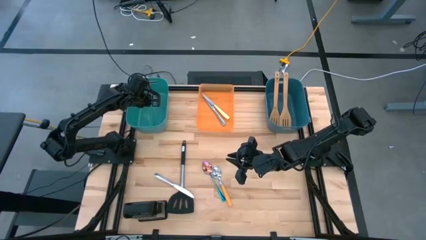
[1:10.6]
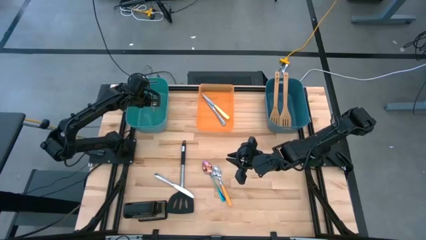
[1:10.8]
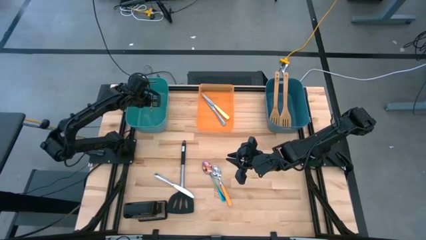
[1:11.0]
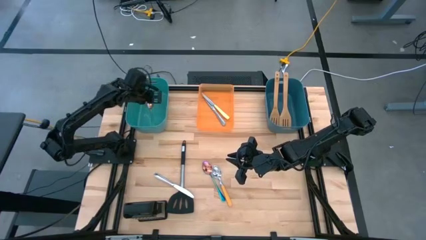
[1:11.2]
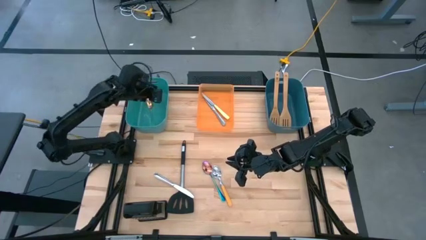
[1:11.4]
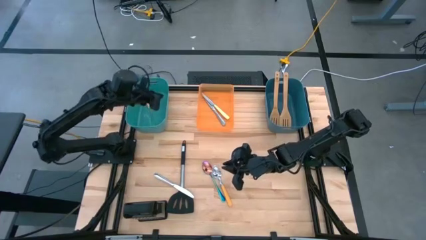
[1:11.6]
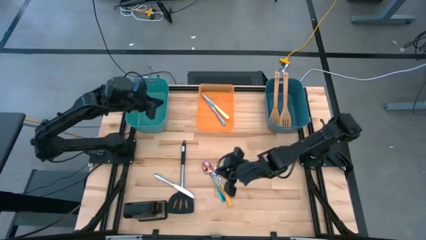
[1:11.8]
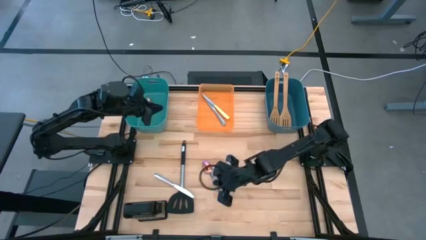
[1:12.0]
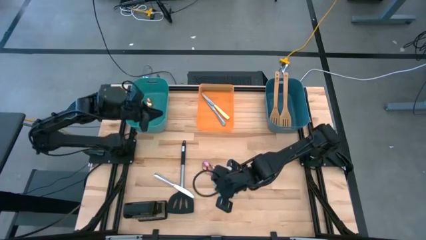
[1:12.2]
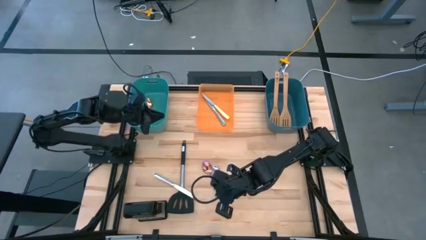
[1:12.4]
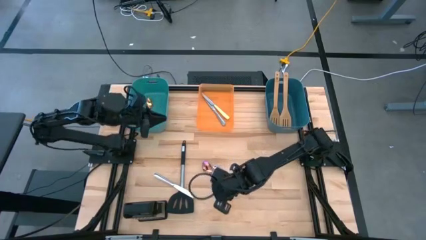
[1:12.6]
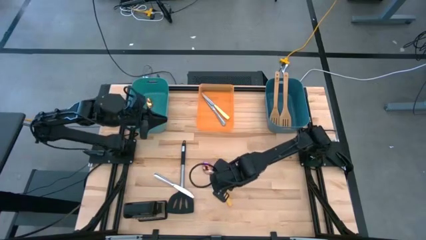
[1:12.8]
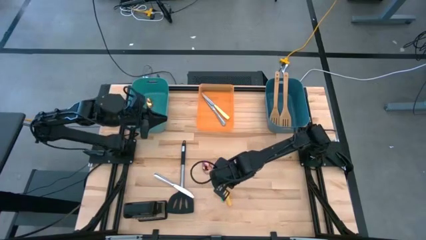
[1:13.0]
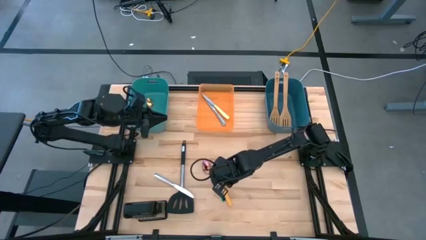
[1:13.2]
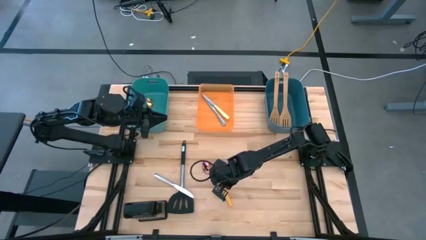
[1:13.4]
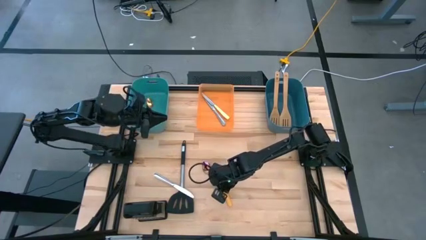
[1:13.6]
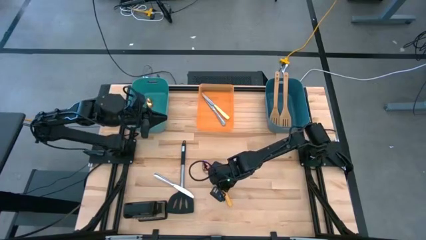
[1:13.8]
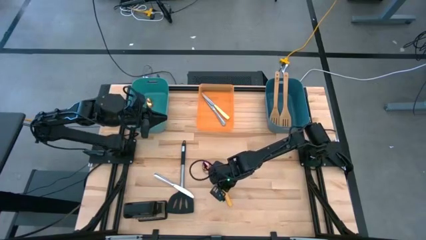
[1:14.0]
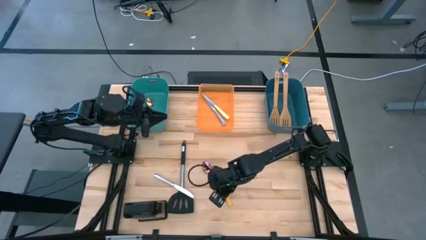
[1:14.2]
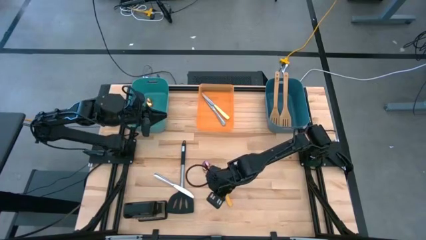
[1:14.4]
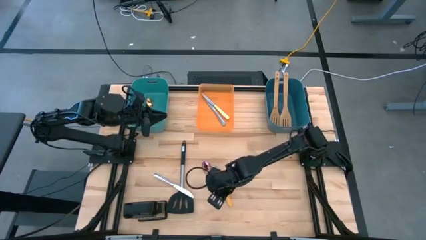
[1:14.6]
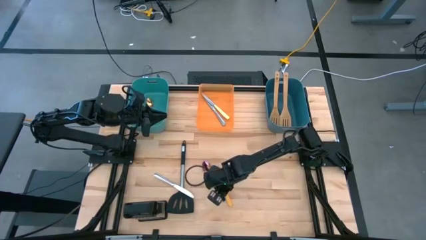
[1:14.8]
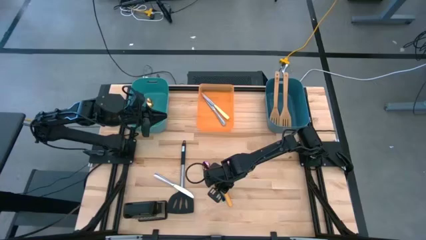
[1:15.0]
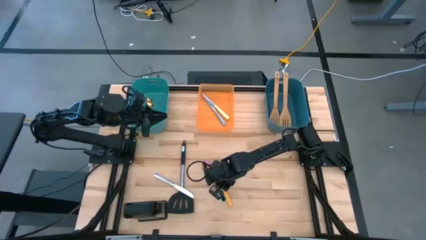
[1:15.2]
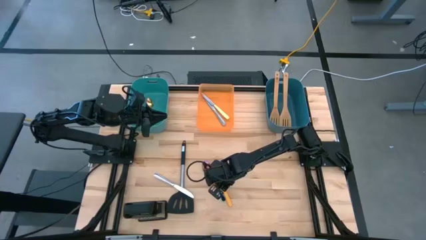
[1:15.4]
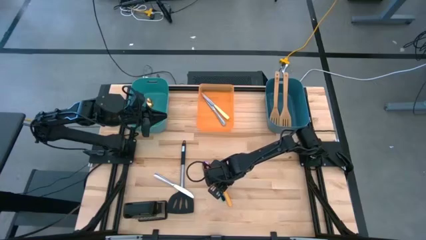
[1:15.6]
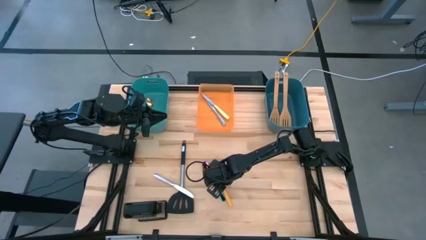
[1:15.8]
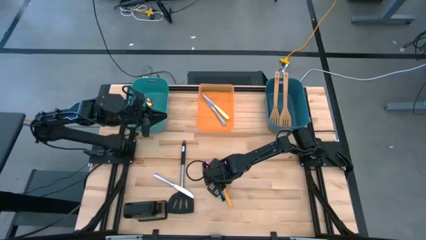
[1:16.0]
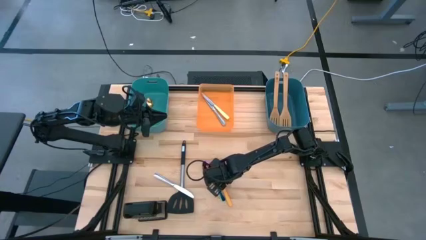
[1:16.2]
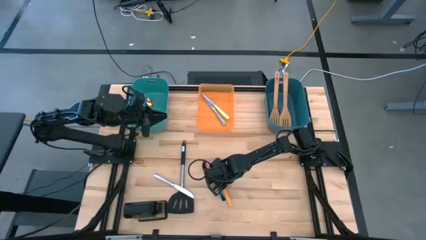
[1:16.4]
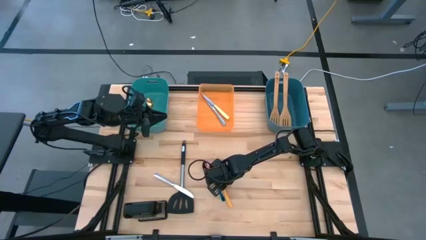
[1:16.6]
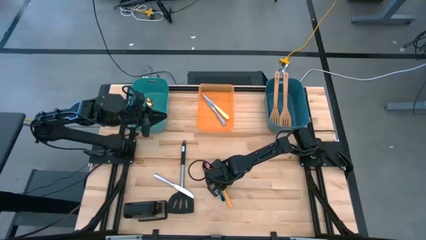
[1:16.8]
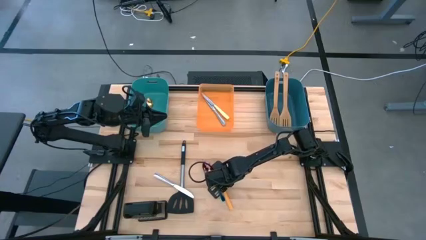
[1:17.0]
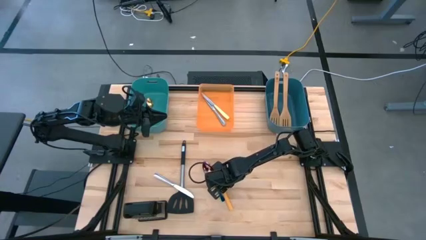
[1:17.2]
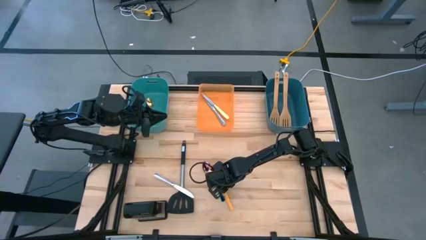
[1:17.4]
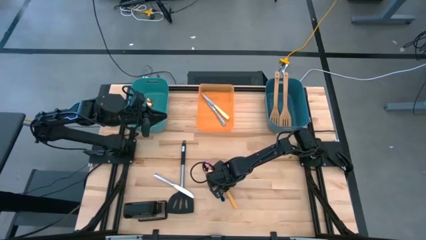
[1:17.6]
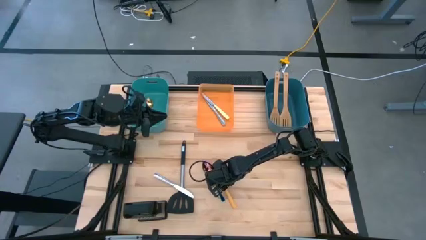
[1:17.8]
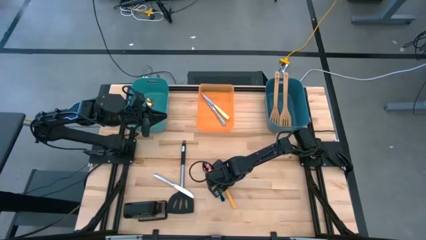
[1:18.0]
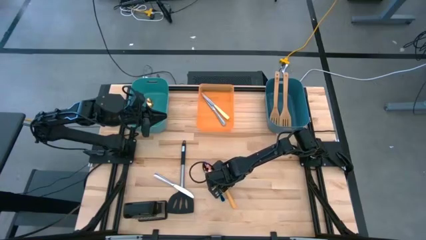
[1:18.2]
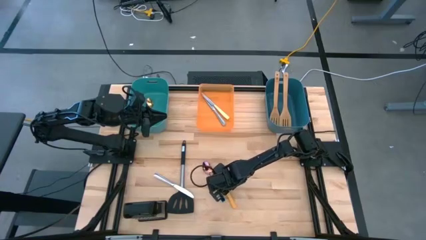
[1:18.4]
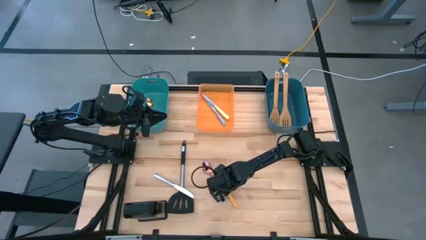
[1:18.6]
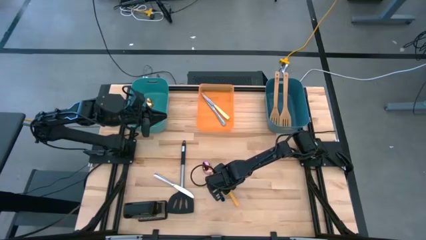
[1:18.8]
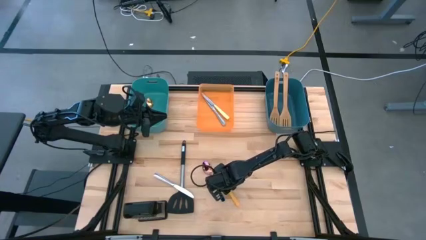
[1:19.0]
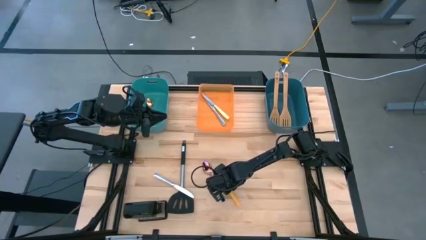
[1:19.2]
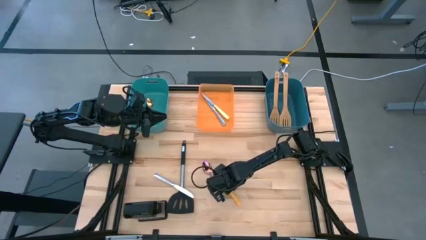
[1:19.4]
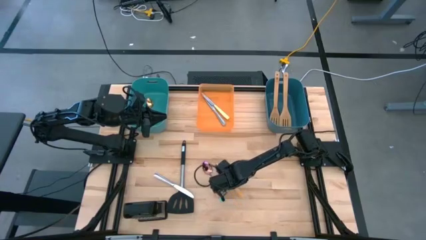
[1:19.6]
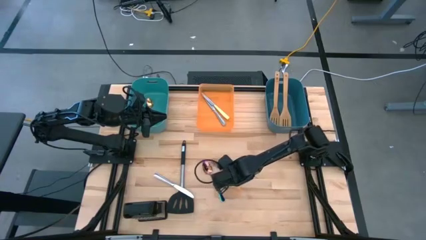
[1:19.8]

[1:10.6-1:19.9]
Task: Pick & Place Kitchen Items
Put the yellow spoon into the green bin
